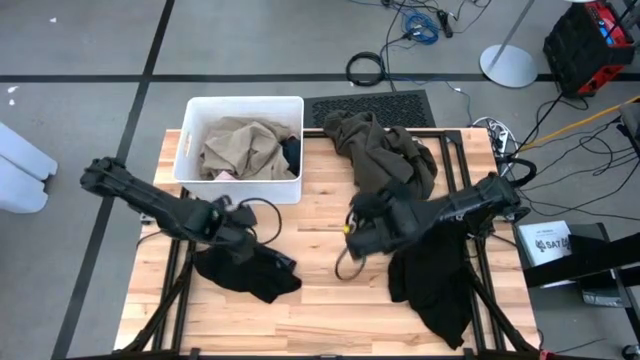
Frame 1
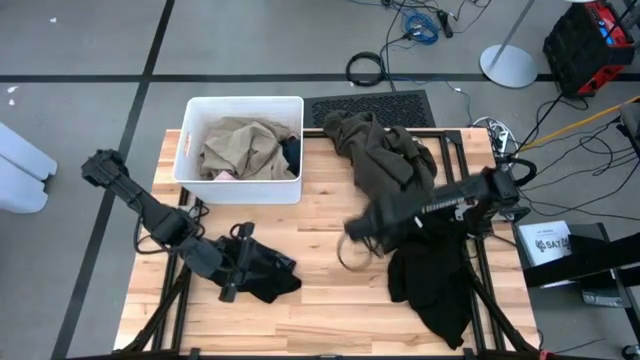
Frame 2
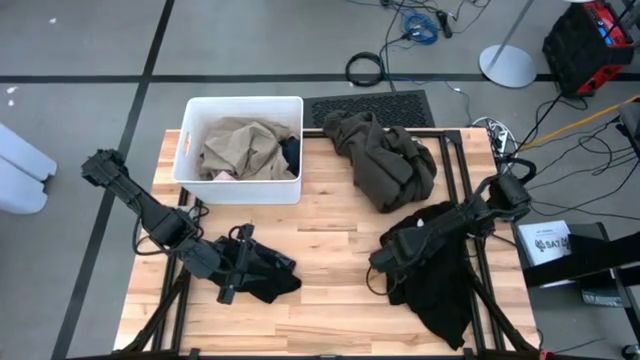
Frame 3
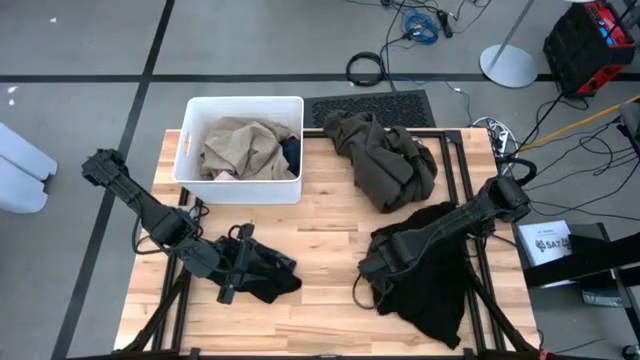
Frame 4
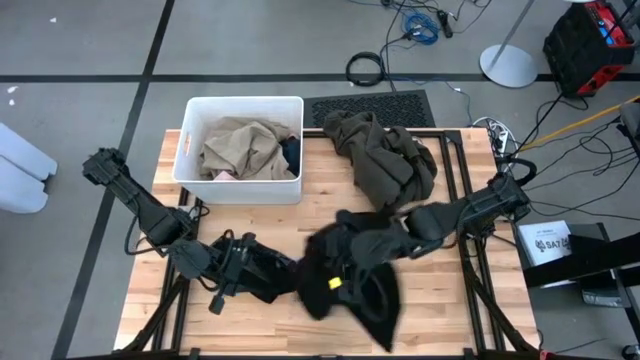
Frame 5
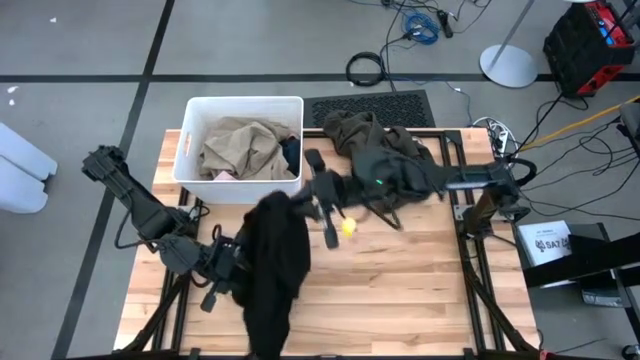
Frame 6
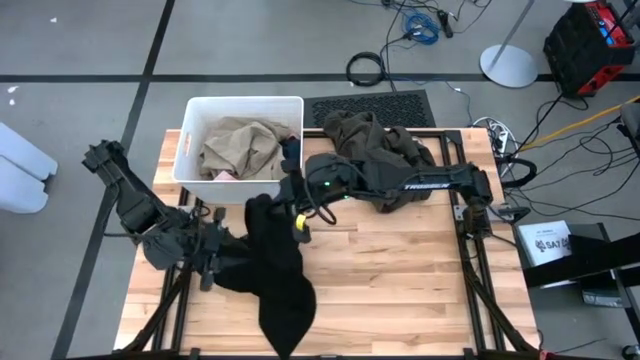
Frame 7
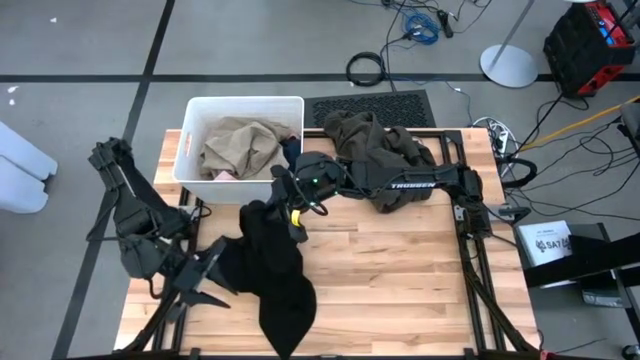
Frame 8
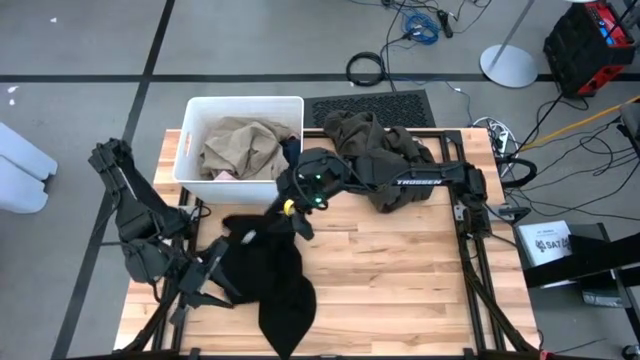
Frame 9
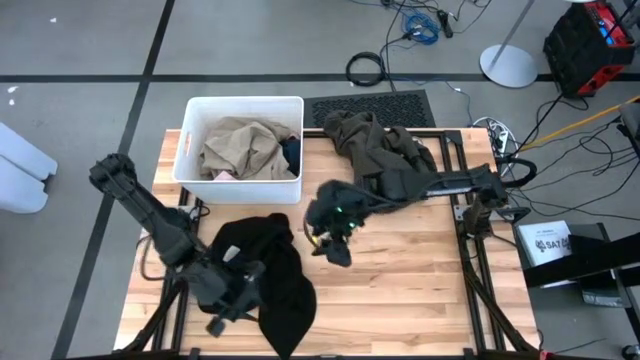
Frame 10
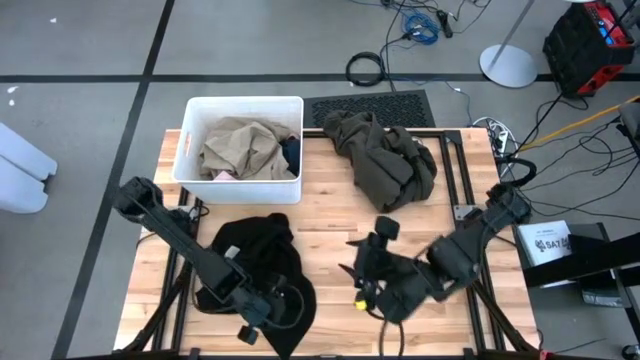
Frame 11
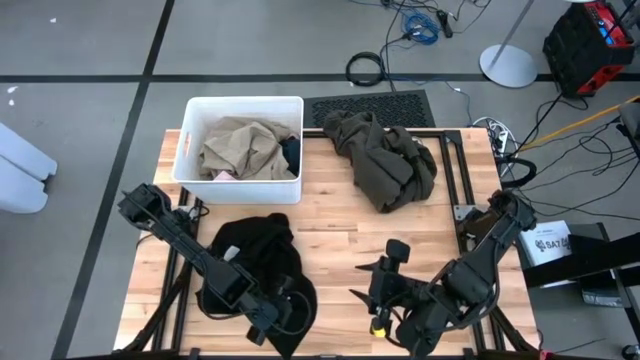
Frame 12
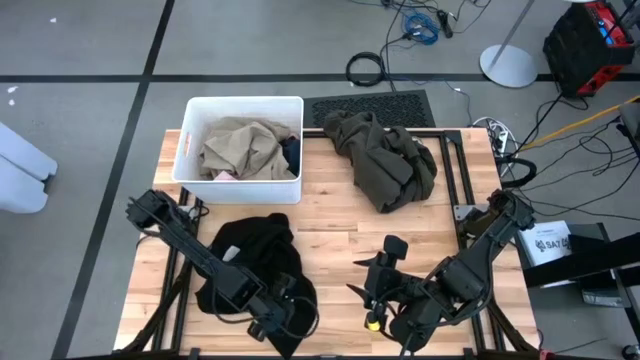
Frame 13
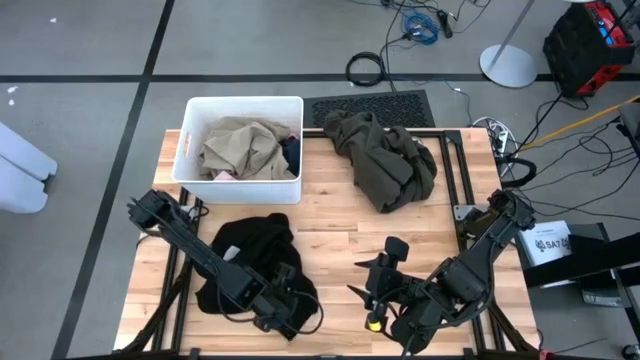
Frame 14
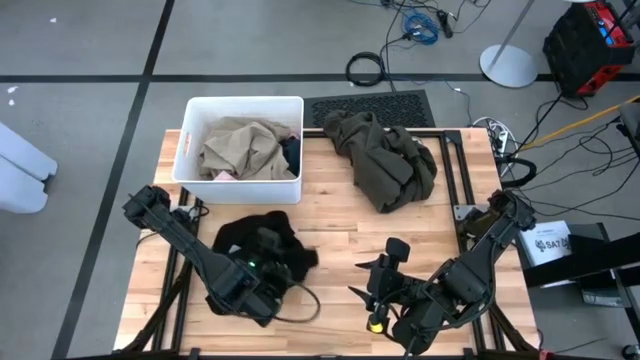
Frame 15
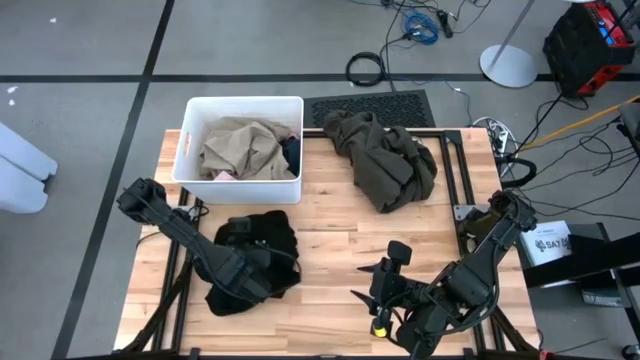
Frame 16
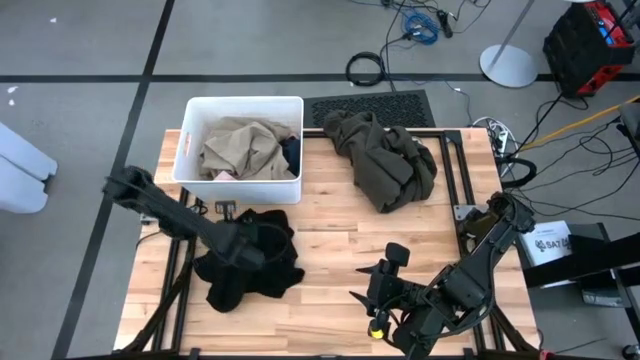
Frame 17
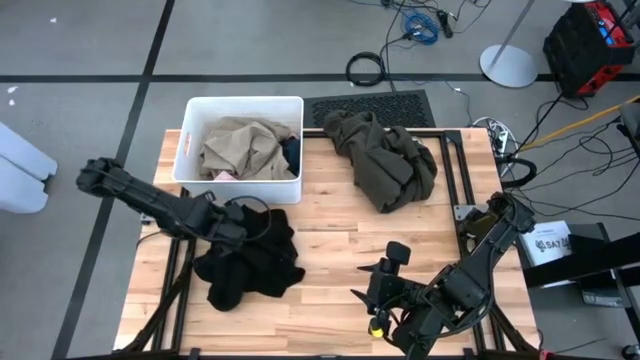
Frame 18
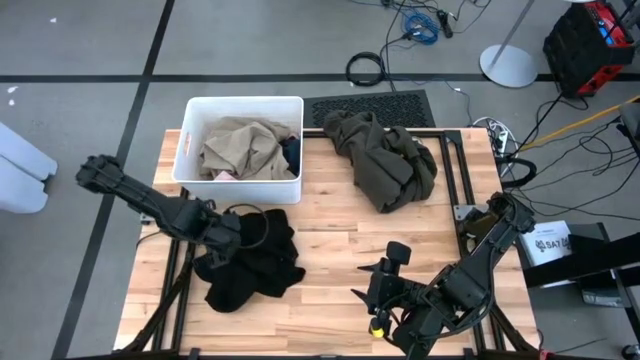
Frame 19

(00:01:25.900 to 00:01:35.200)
Task: Sort clothes
Move the black shirt to the middle left of the table

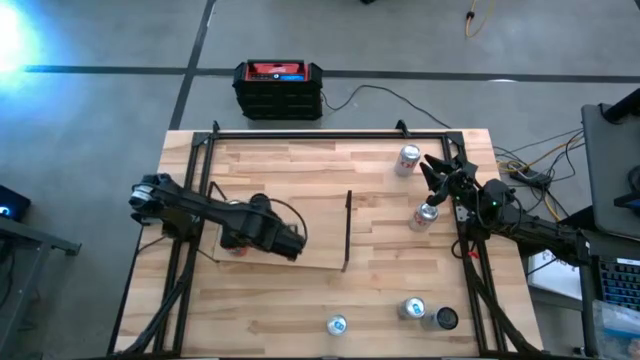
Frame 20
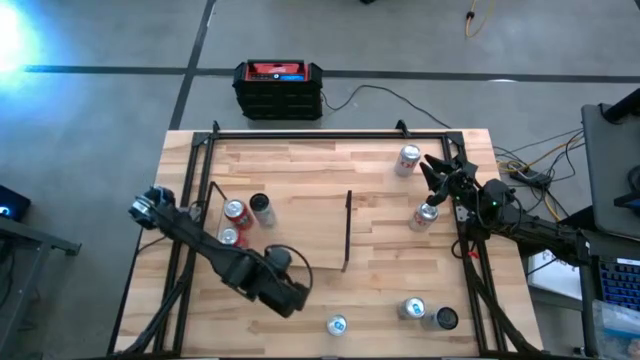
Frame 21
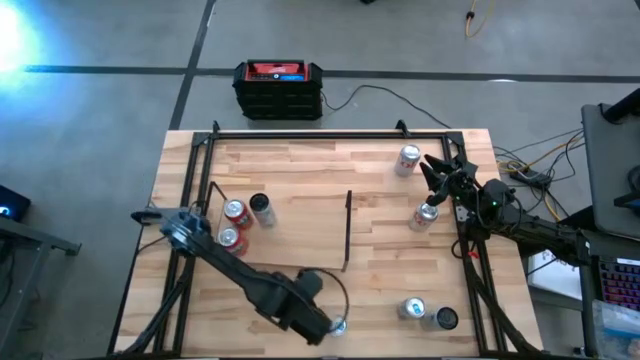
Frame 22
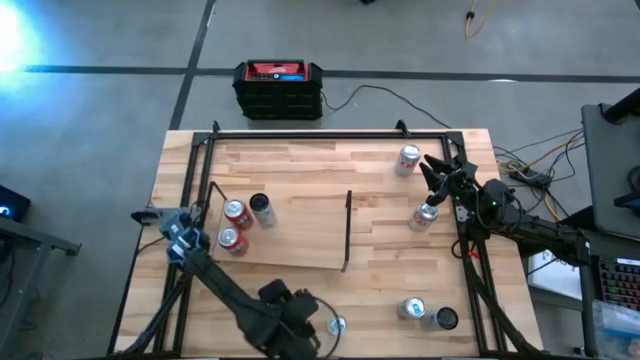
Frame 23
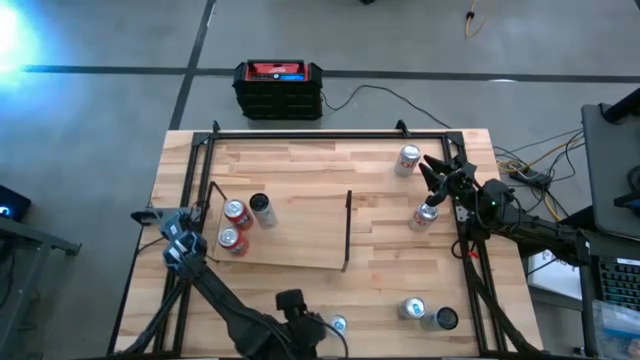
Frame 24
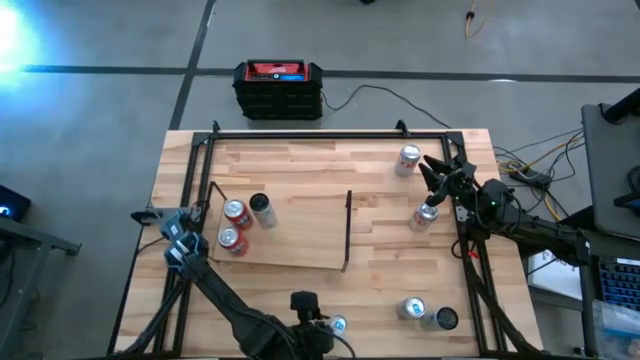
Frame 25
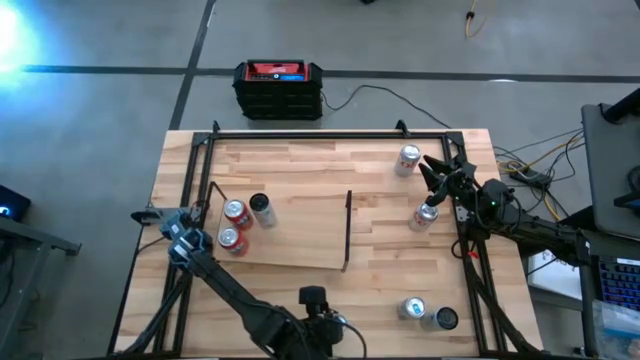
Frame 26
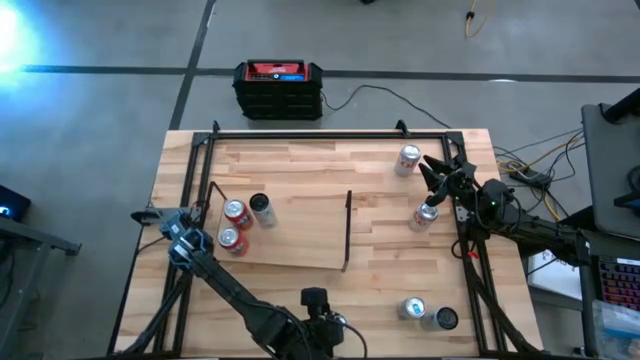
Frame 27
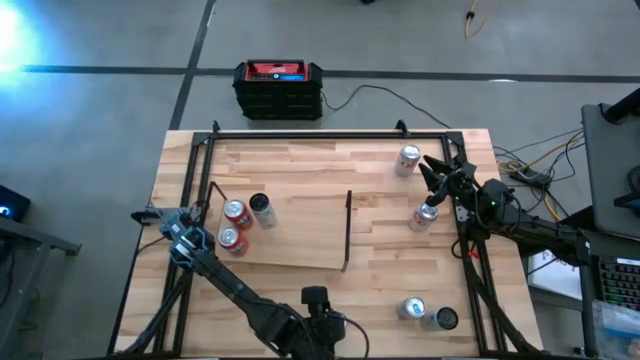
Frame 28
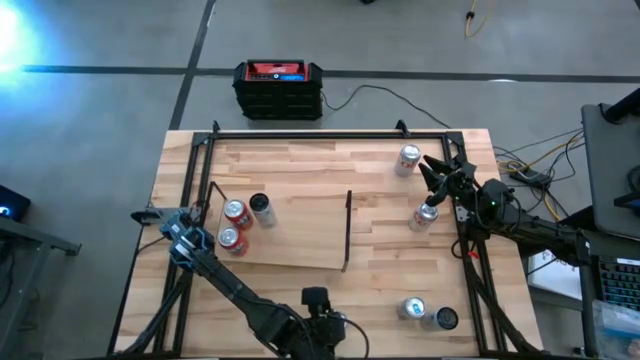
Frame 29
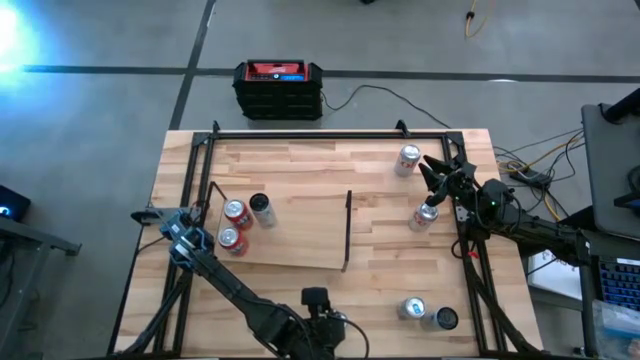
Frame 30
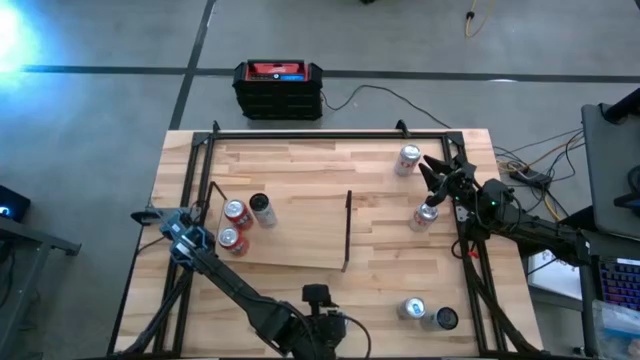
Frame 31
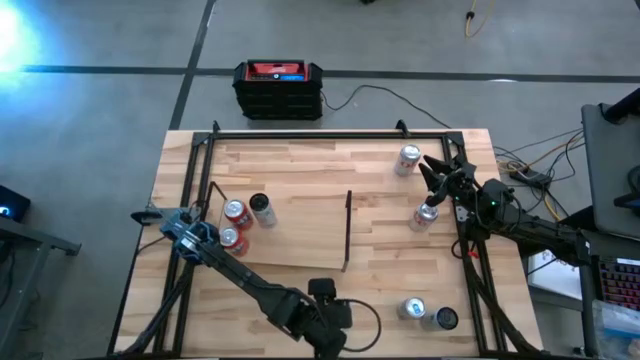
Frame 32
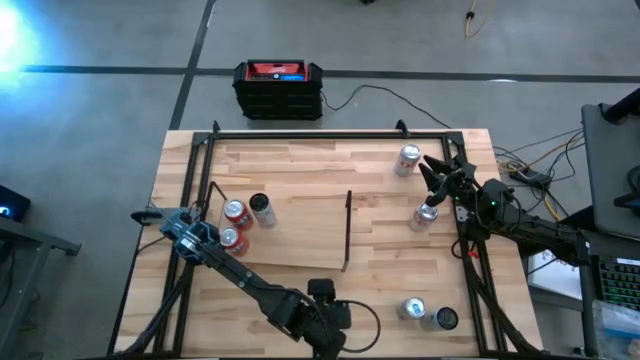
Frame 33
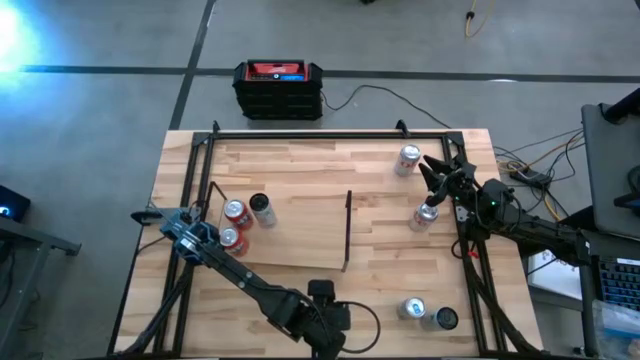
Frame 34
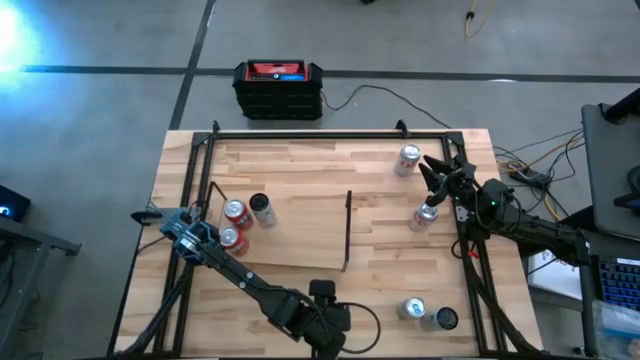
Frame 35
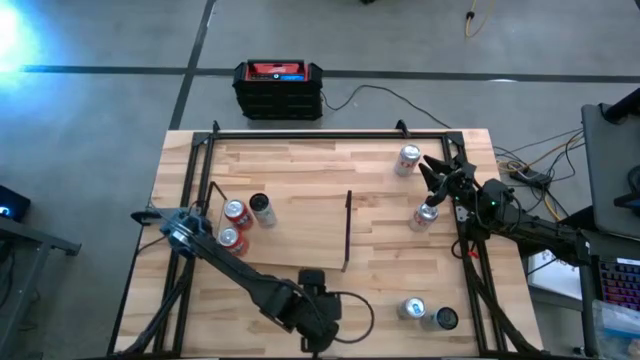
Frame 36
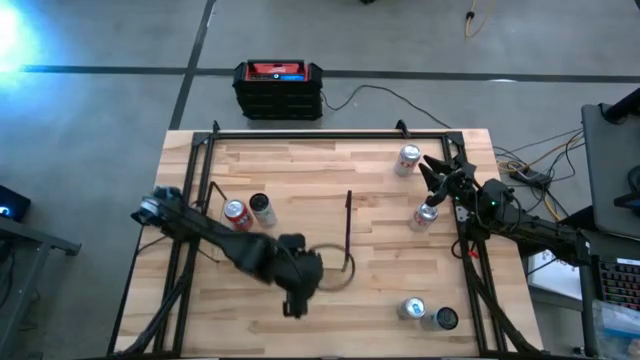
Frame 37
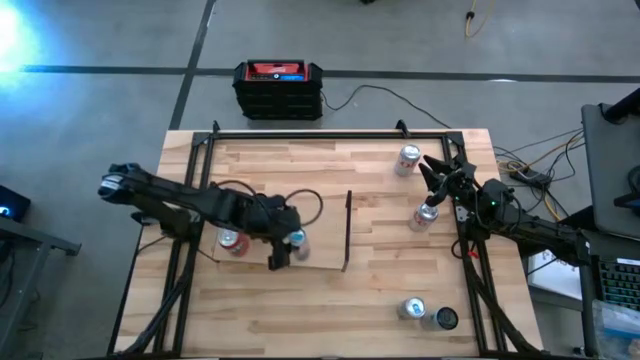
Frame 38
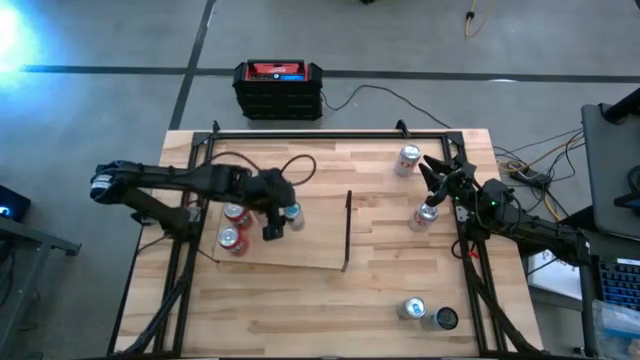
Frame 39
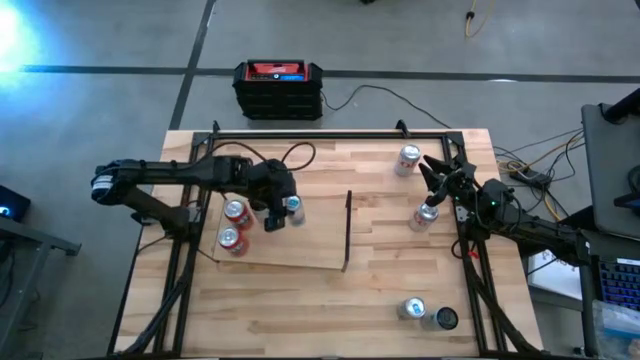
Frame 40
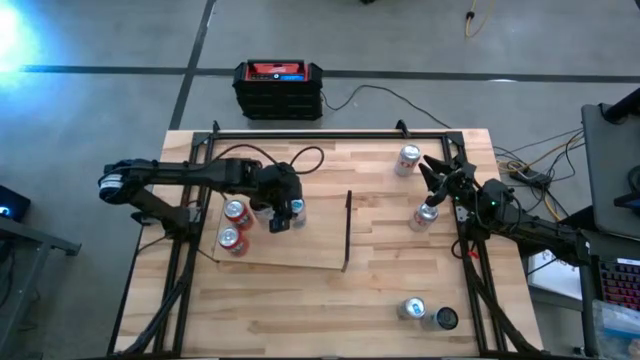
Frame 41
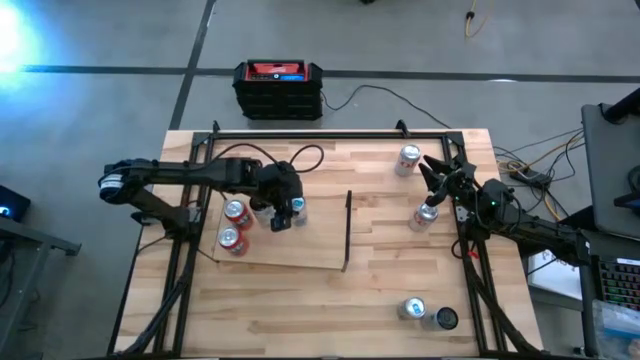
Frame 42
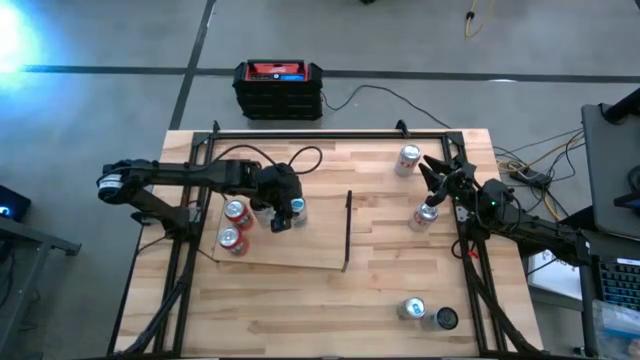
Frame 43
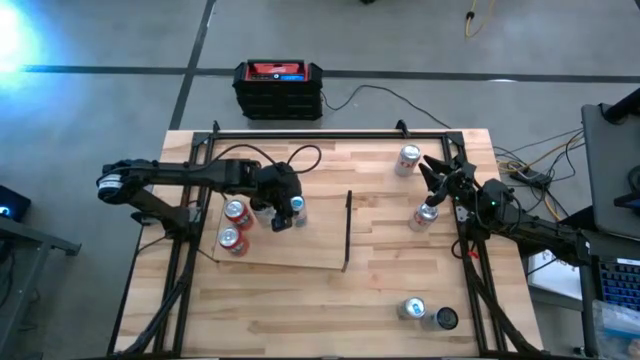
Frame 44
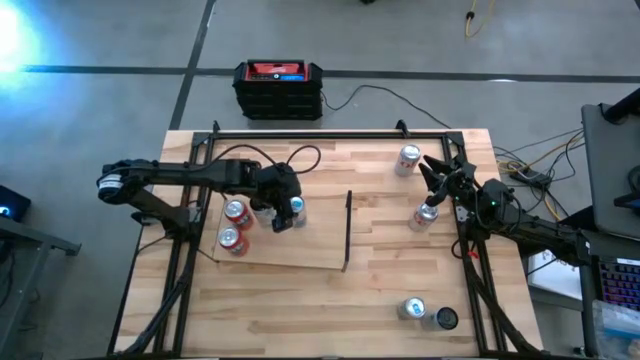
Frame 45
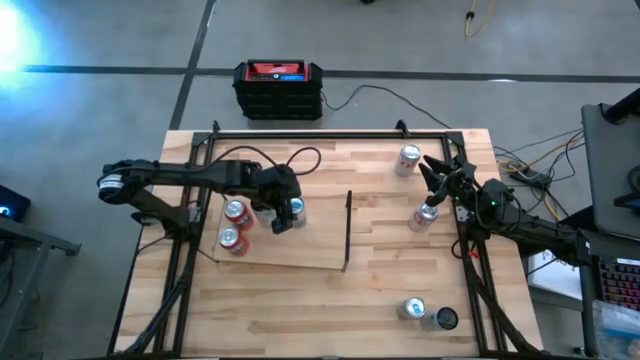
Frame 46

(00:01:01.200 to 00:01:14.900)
Task: Place canned beverage on shelf
Put the left blue soda can on the shelf
